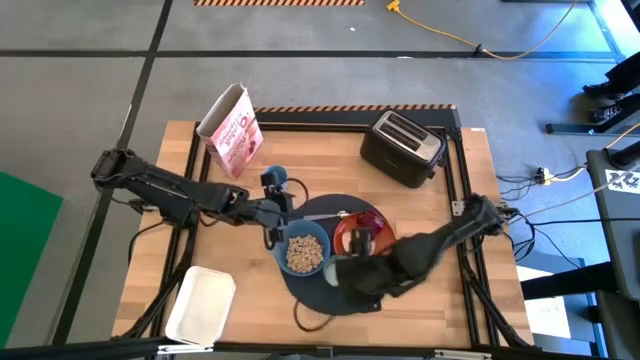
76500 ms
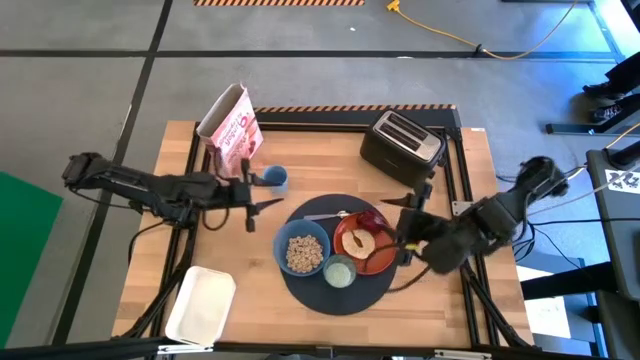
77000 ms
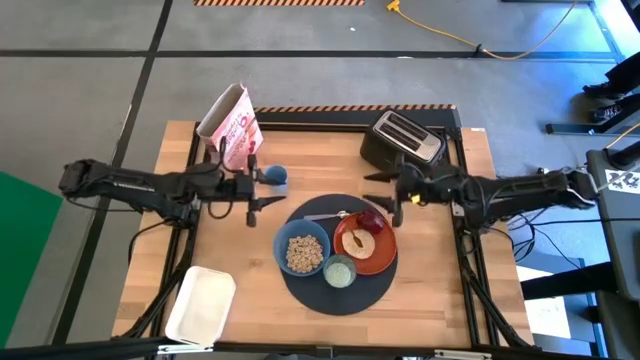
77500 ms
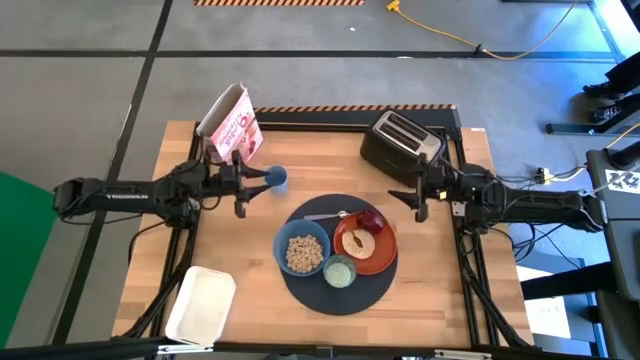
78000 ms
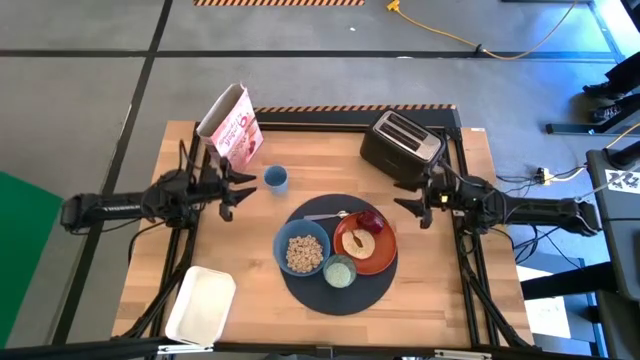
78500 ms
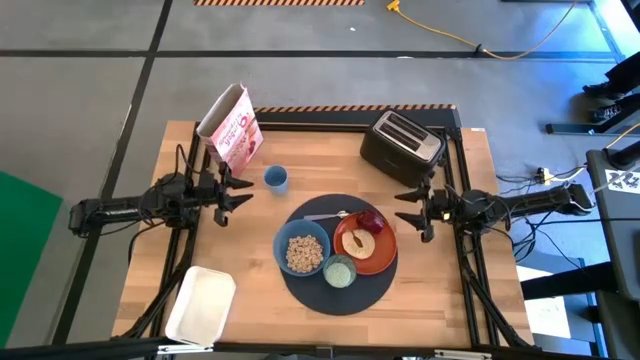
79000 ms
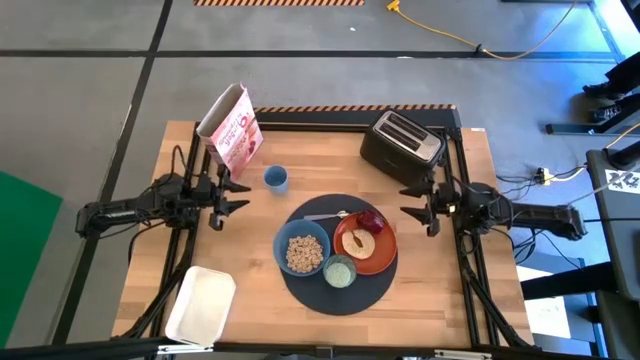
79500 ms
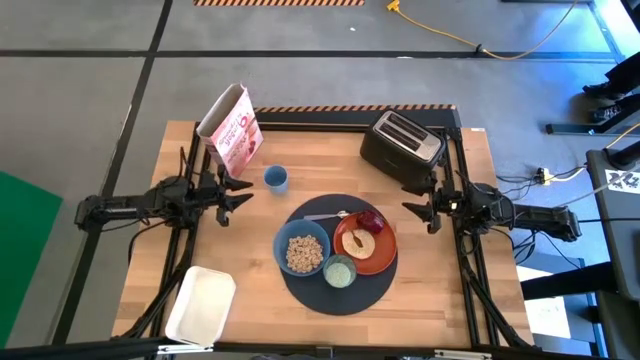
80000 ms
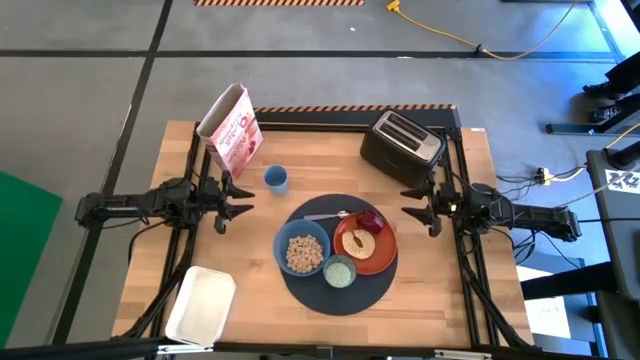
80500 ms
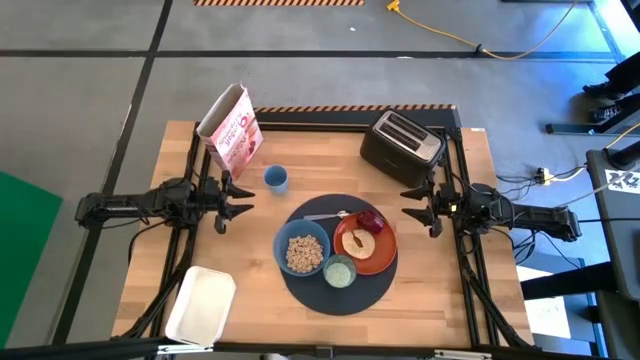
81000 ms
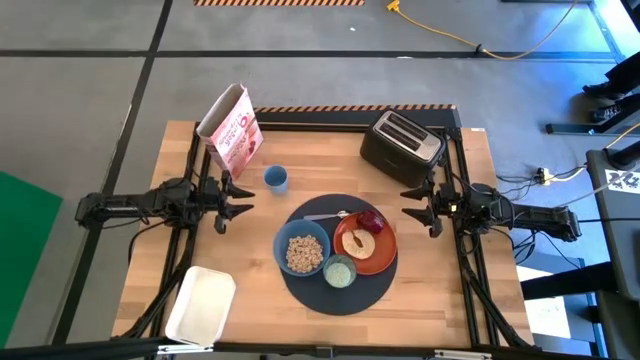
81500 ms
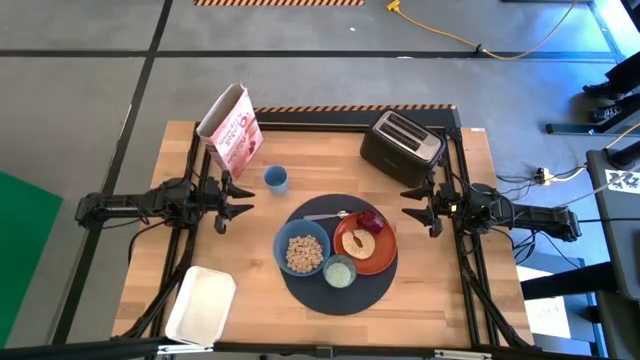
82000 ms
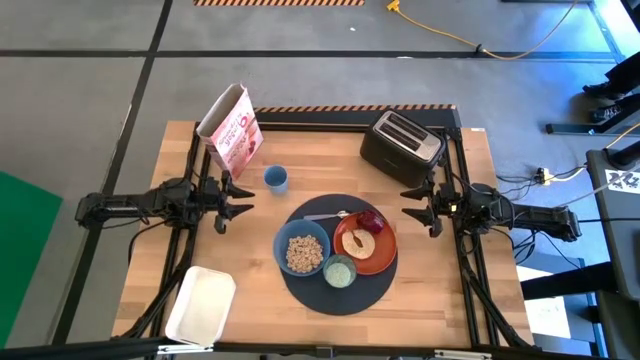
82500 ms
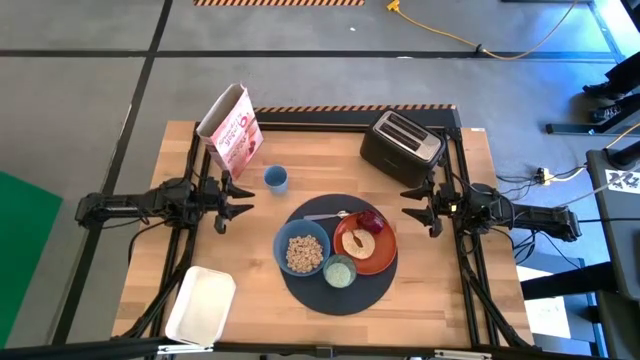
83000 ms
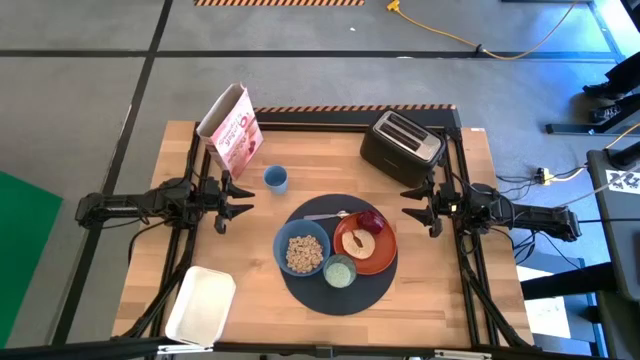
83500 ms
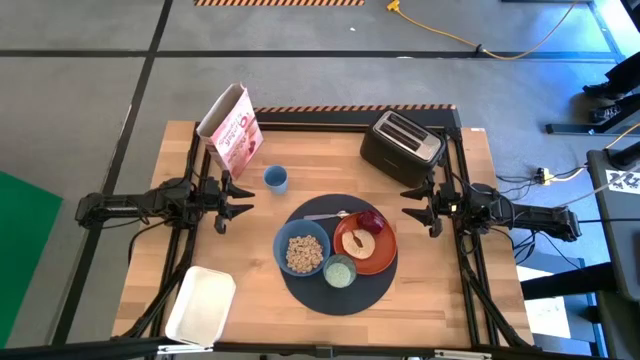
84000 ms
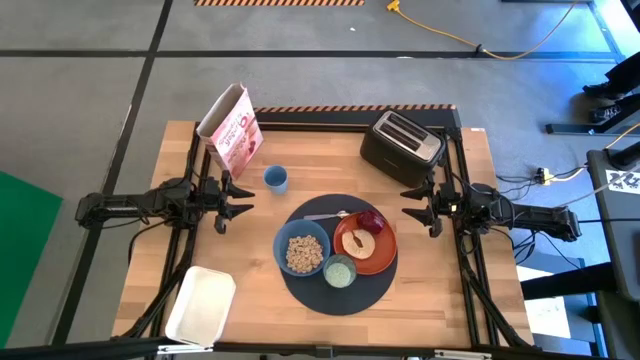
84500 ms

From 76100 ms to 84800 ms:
Task: Arrange a breakfast setting
Return to Home Position

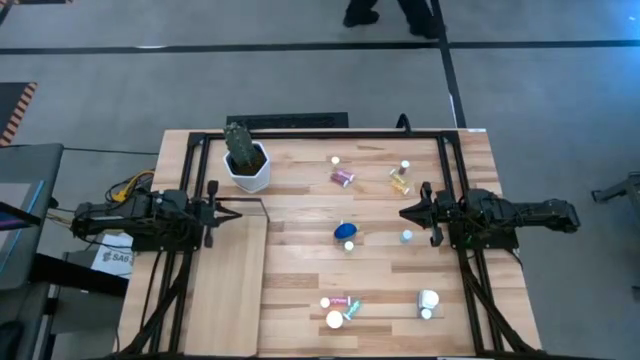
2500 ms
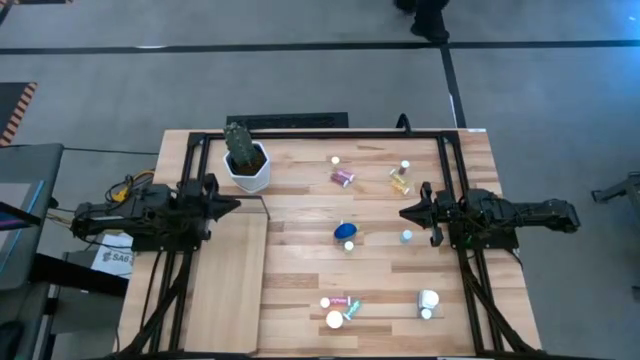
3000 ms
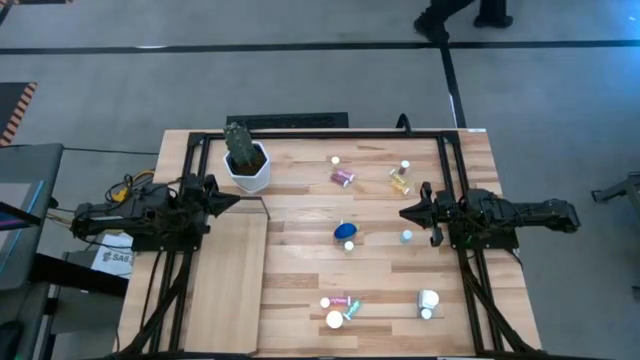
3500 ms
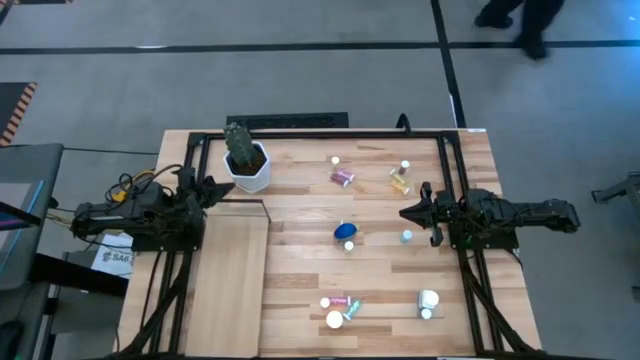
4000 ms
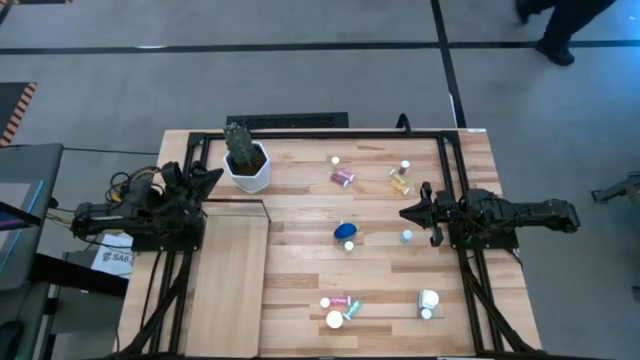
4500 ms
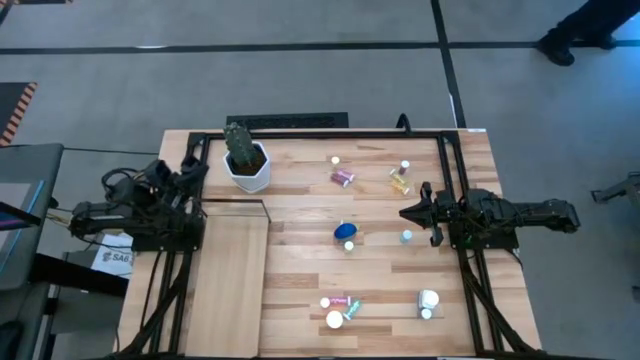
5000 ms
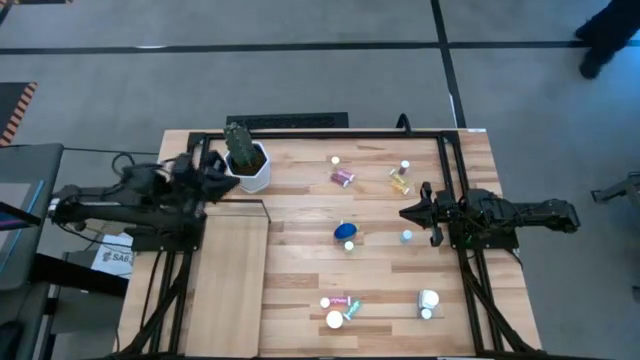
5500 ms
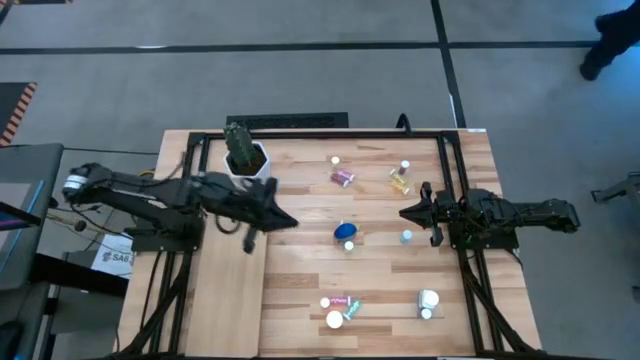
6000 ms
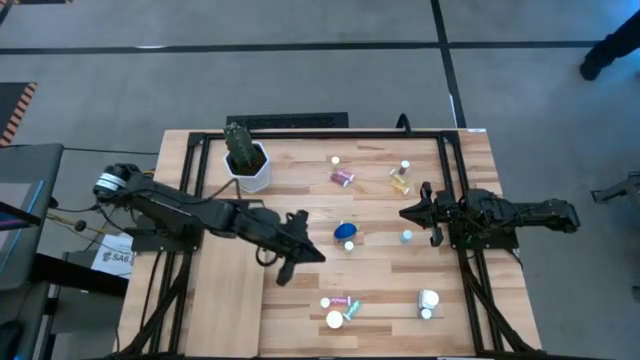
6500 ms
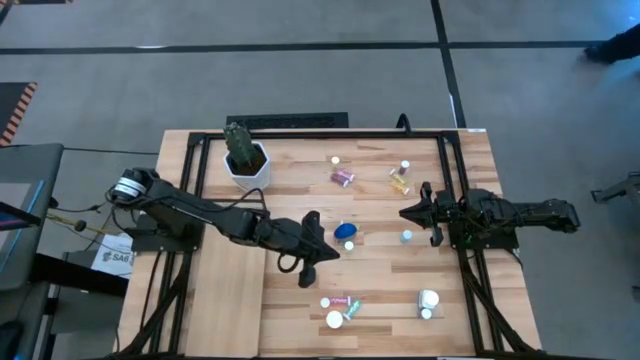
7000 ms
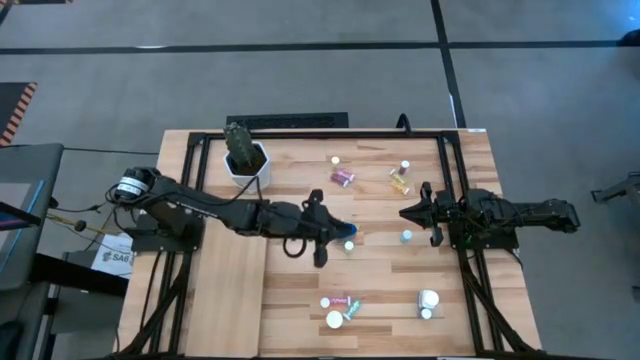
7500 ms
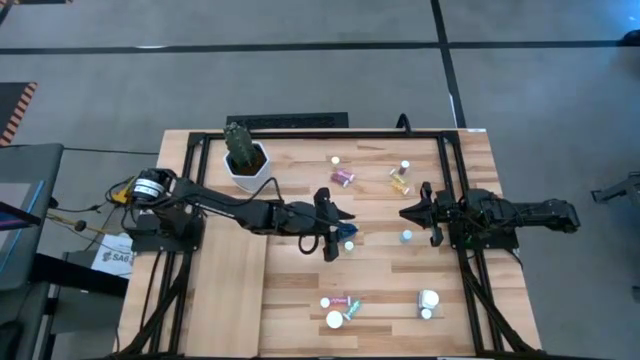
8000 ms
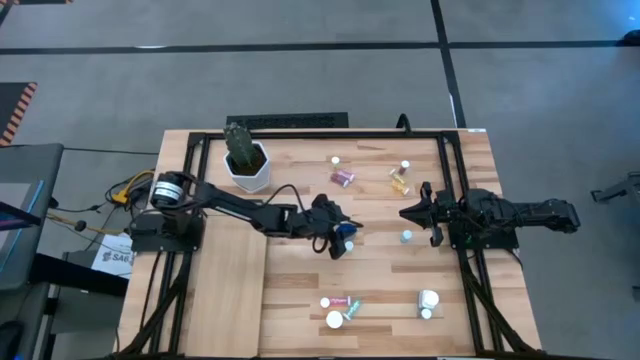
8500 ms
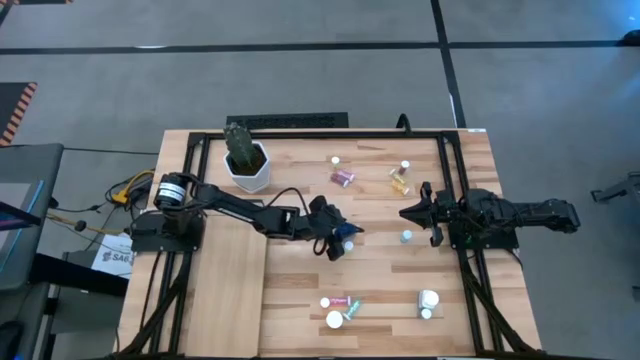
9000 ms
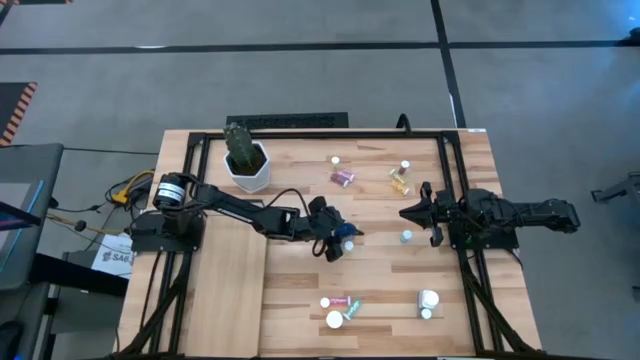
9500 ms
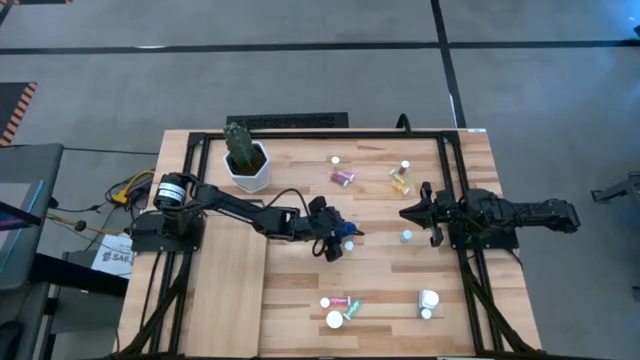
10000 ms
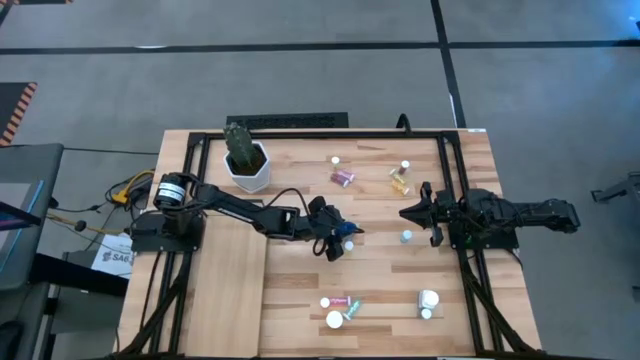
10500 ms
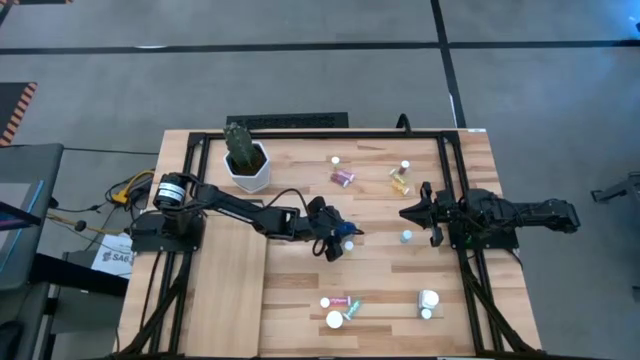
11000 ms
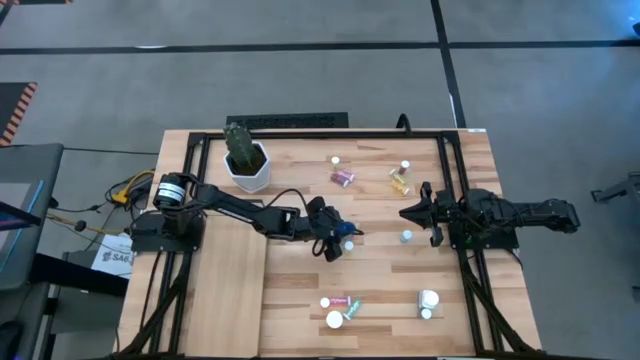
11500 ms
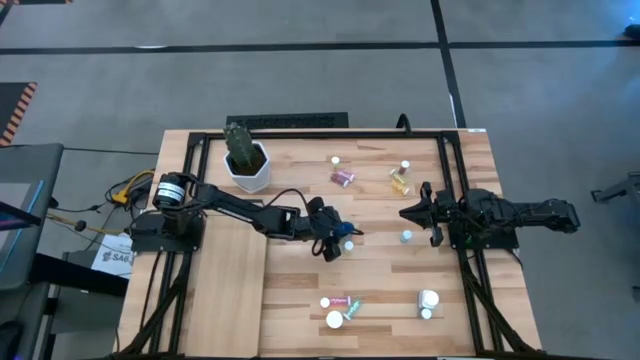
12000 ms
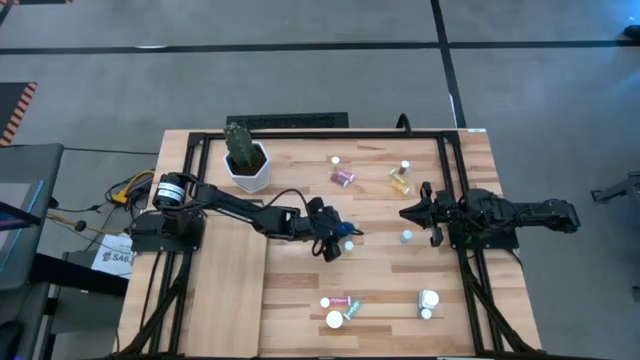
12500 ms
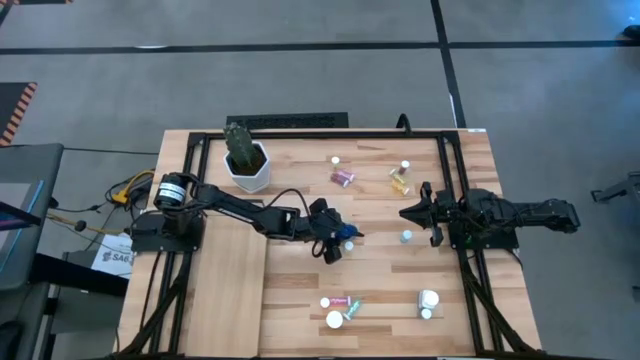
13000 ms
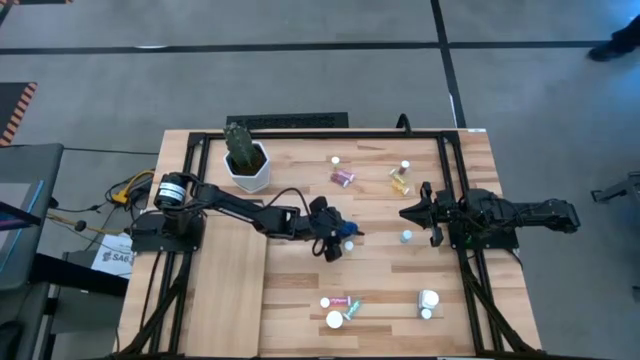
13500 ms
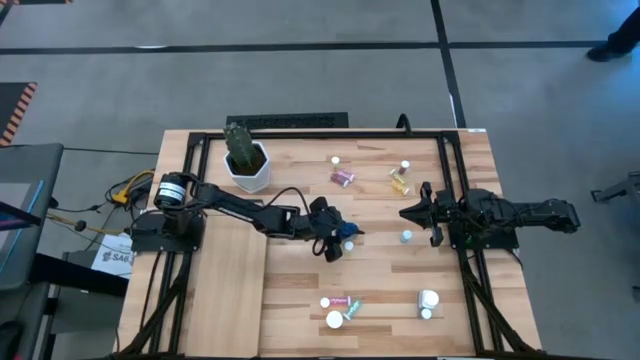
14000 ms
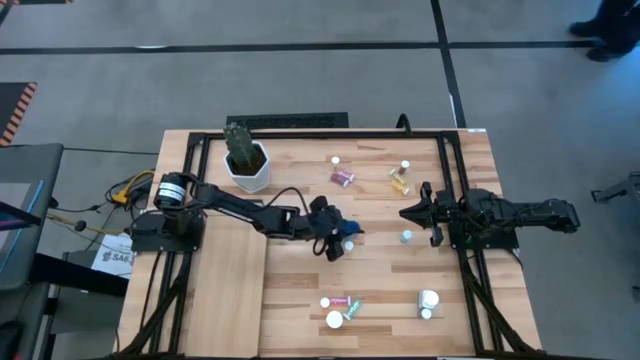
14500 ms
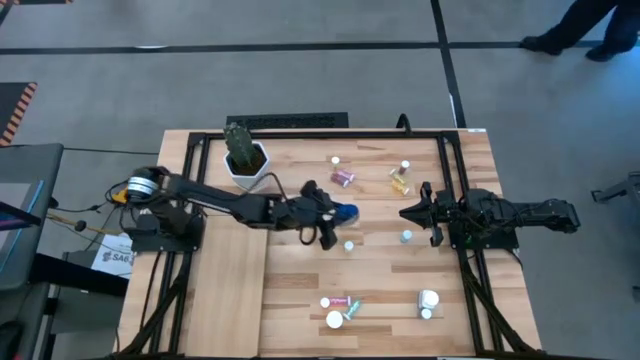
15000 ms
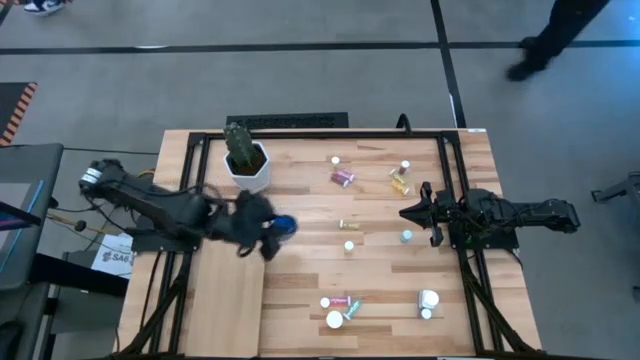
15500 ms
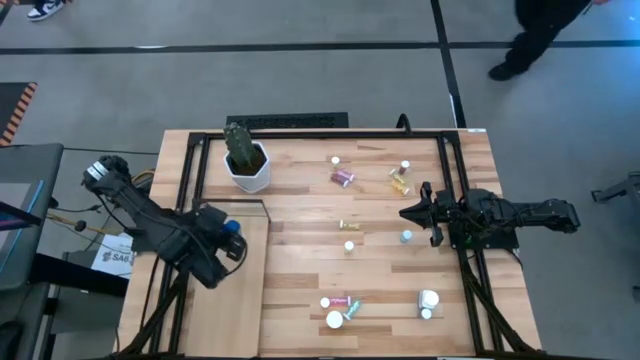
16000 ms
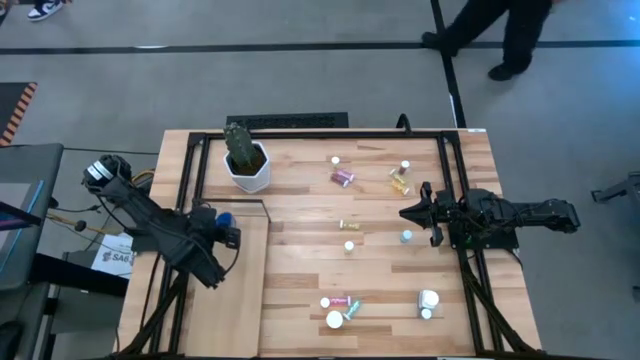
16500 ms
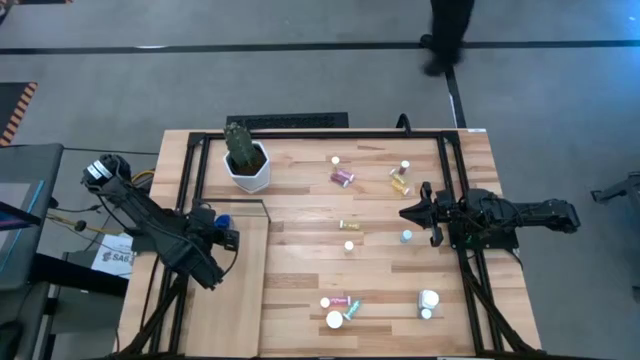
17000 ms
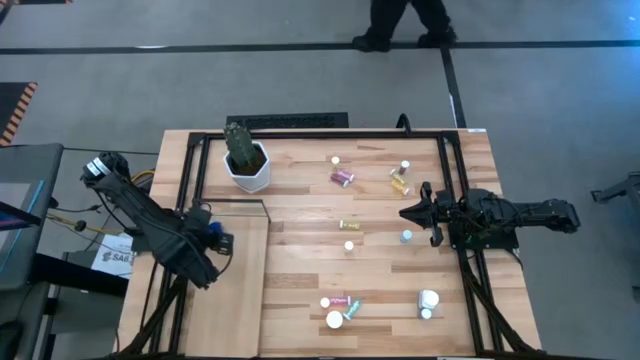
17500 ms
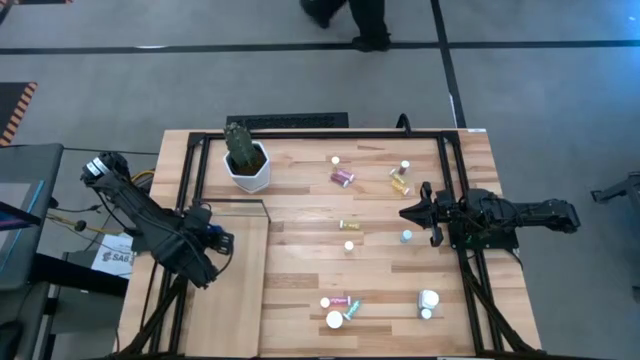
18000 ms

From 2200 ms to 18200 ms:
Task: Pick and place medicine bottles onto shelf by color
Put the blue pill bottle on the shelf
